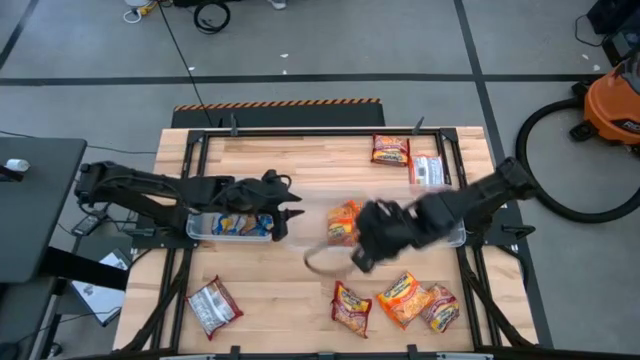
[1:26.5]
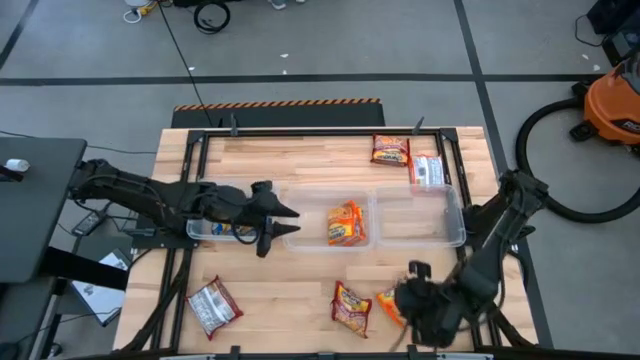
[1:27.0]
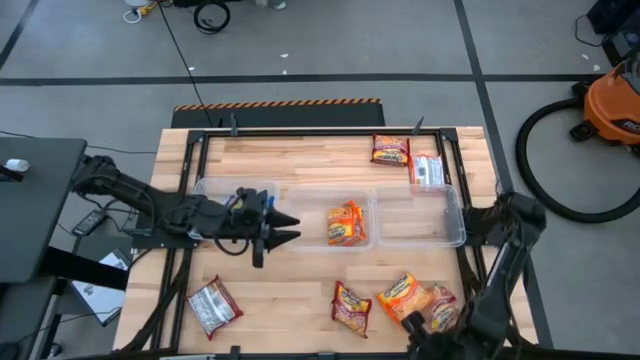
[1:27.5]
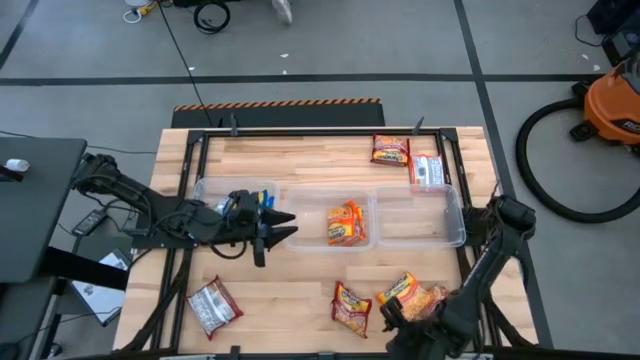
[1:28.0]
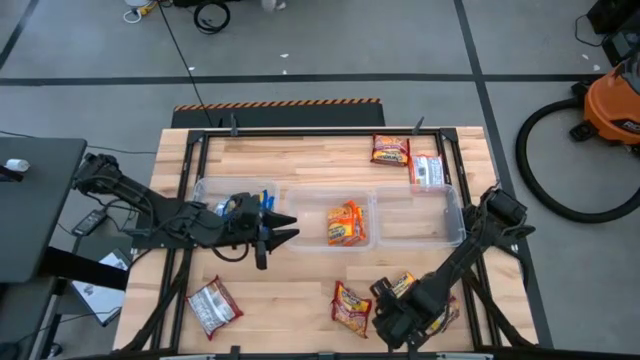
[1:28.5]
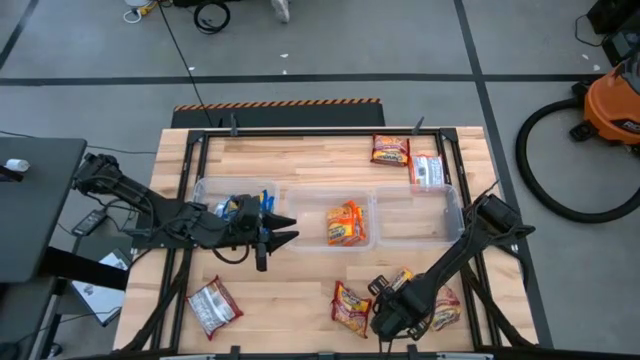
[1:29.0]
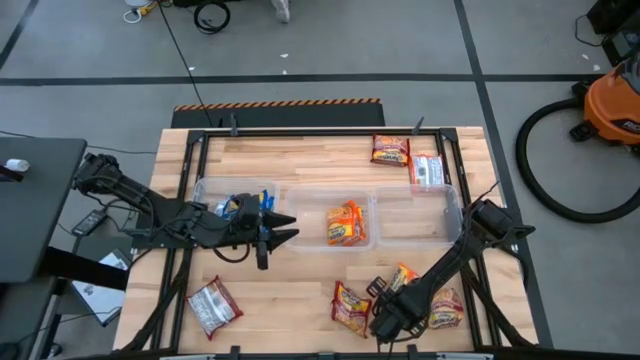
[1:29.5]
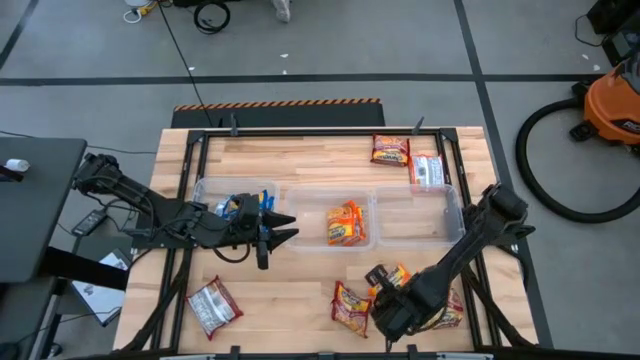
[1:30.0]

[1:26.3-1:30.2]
Task: Sort Maruchan noodles
Put the orange noodle pack into the middle transparent bin

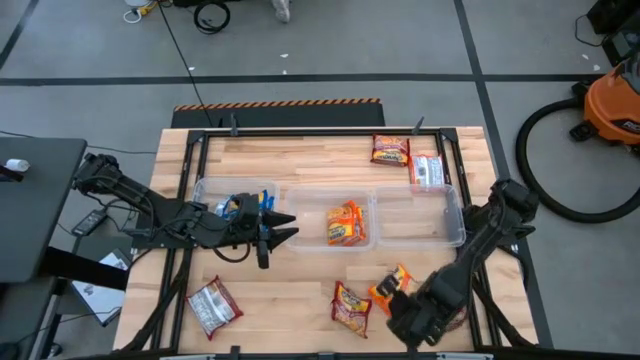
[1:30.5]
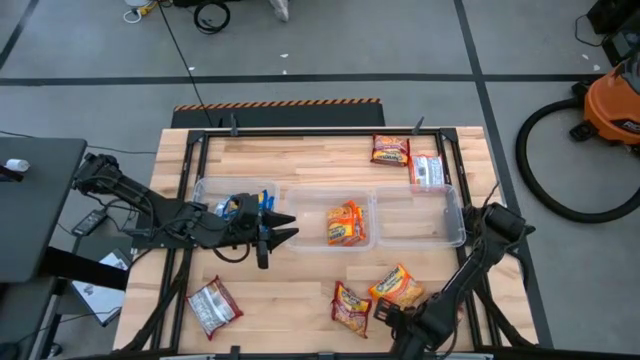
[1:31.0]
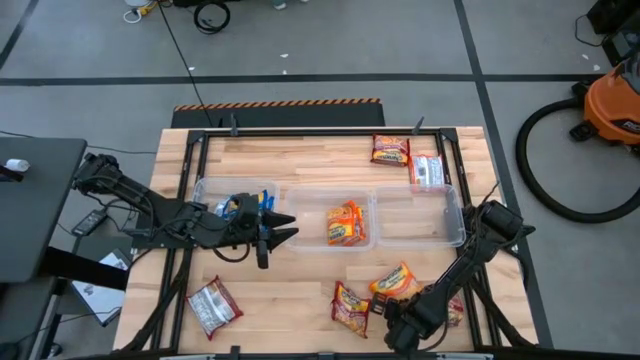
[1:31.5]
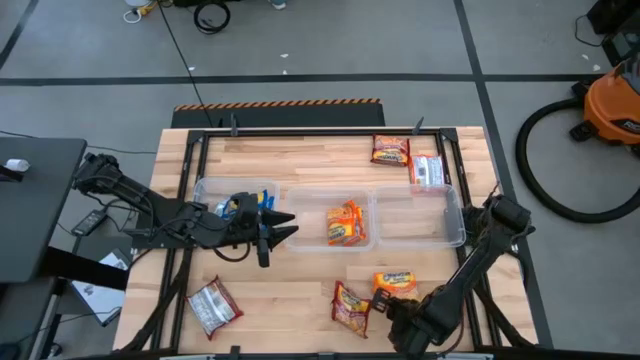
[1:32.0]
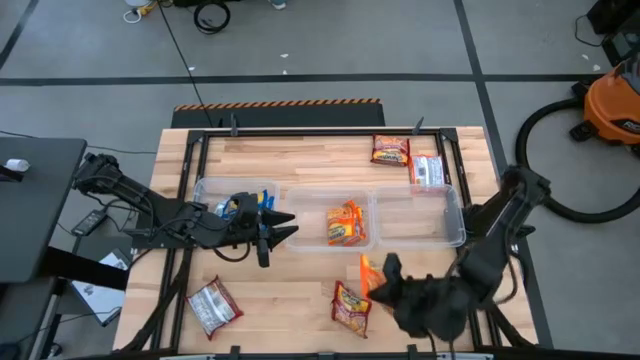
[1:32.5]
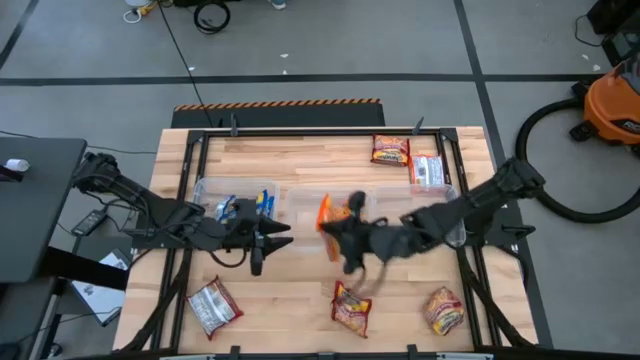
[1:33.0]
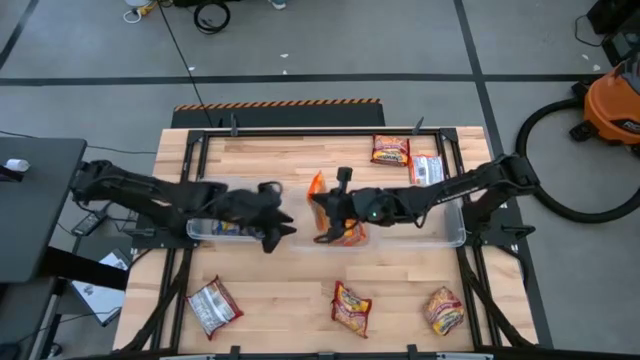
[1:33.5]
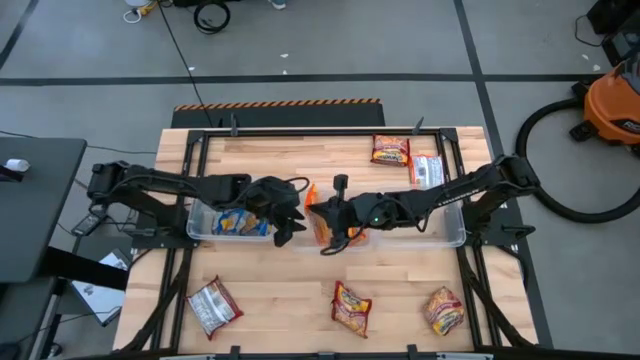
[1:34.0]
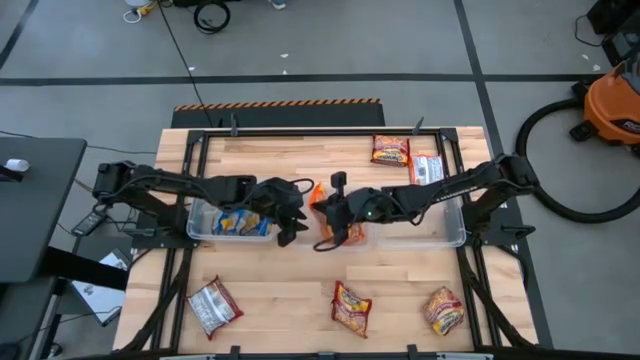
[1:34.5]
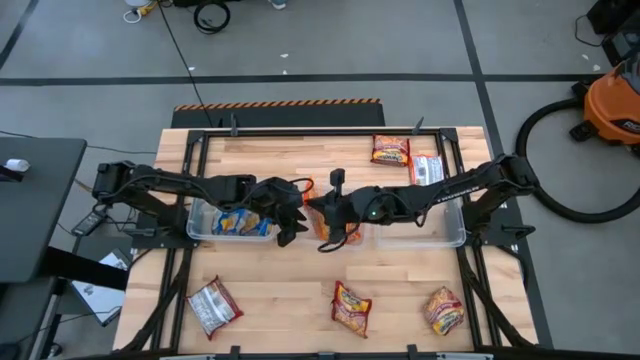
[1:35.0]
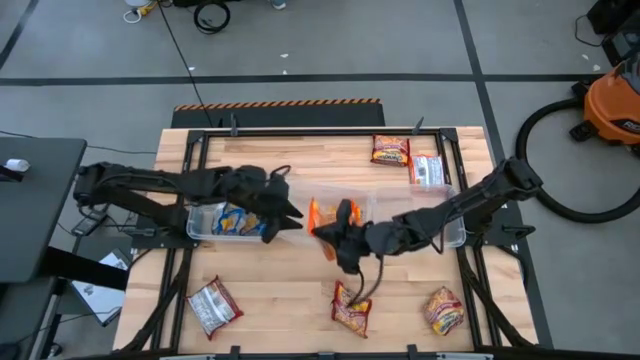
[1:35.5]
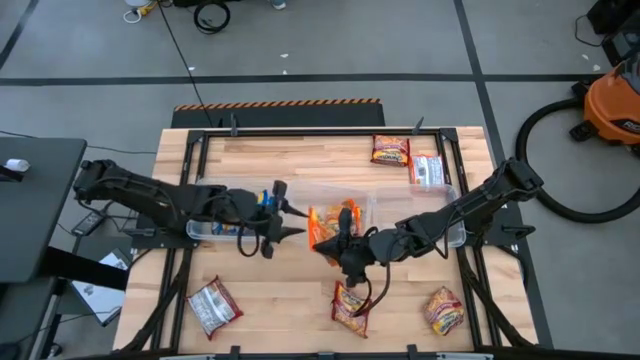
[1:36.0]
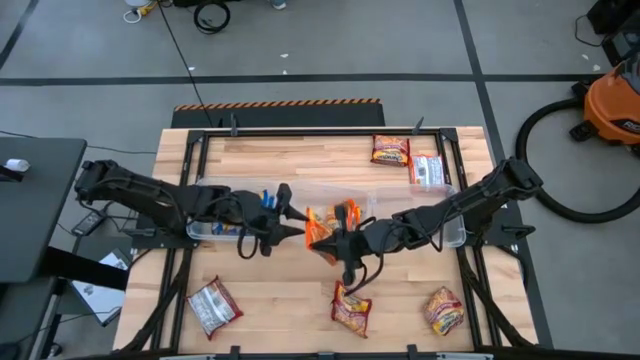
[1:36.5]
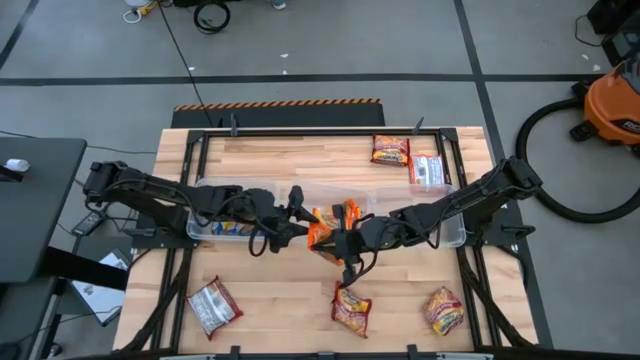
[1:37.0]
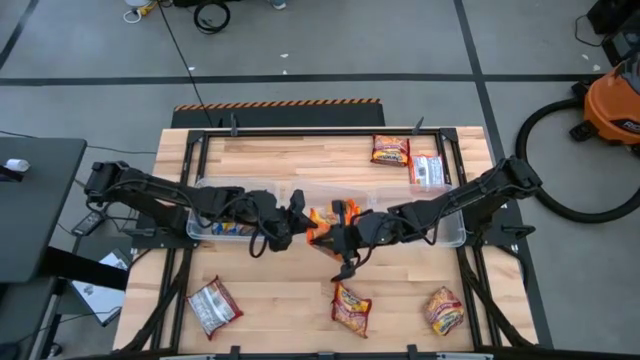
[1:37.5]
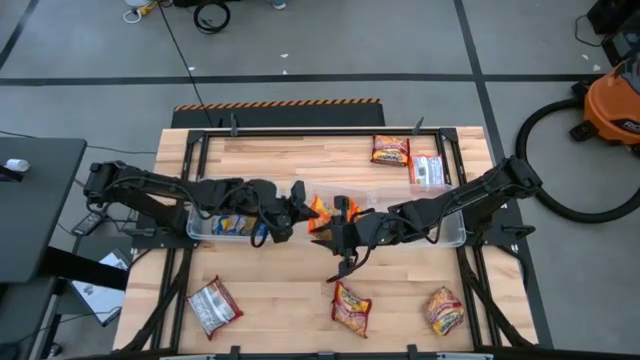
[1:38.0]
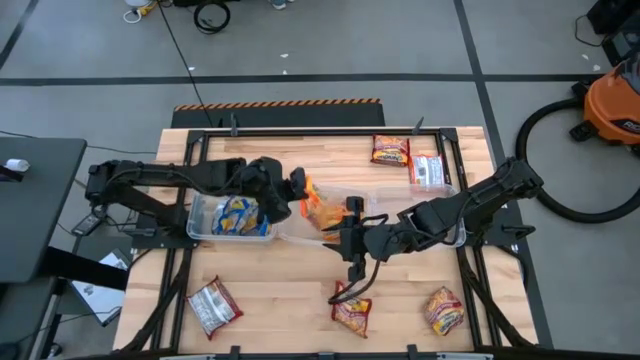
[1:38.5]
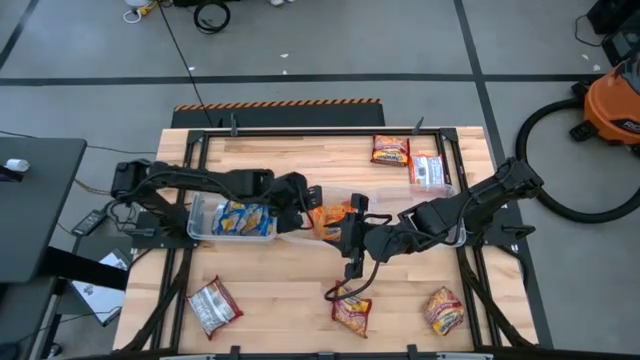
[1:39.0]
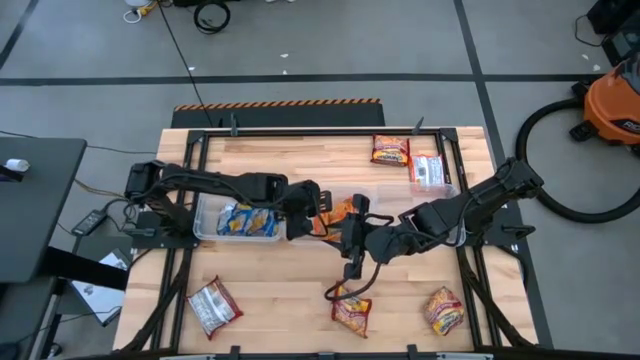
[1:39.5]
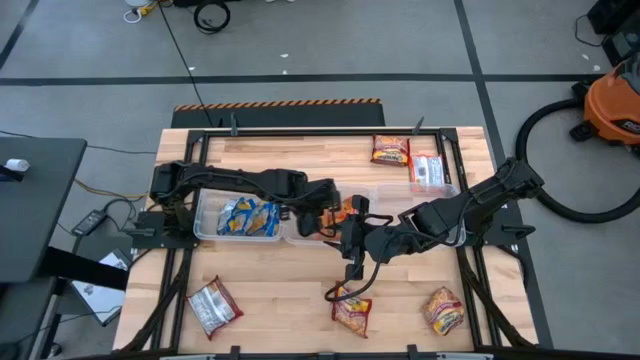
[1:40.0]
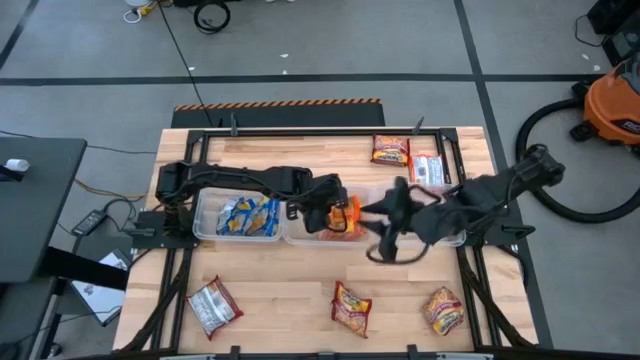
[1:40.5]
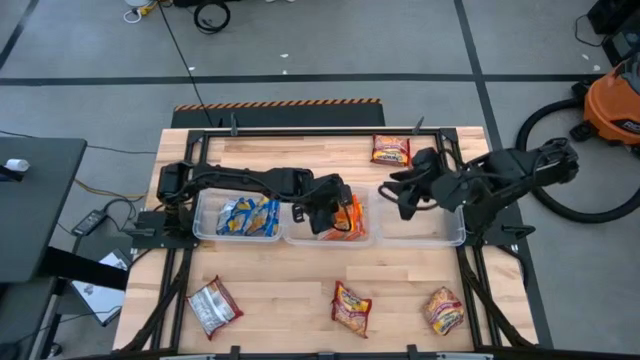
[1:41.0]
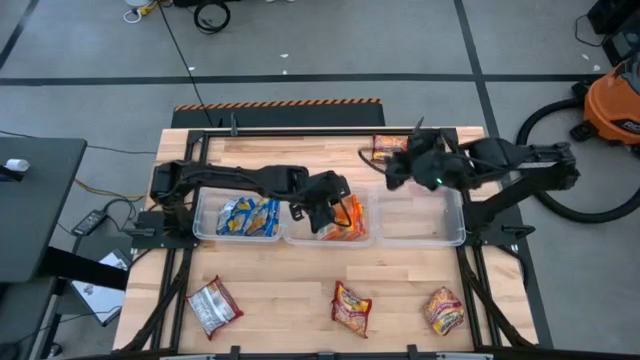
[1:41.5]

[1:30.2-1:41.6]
Put the orange noodle pack into the middle transparent bin

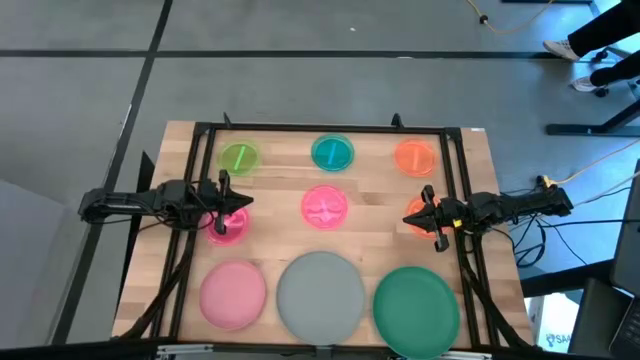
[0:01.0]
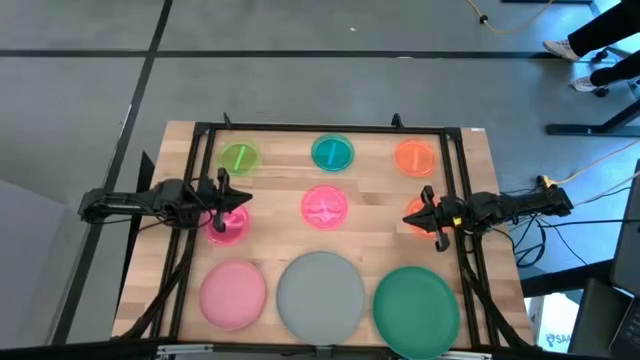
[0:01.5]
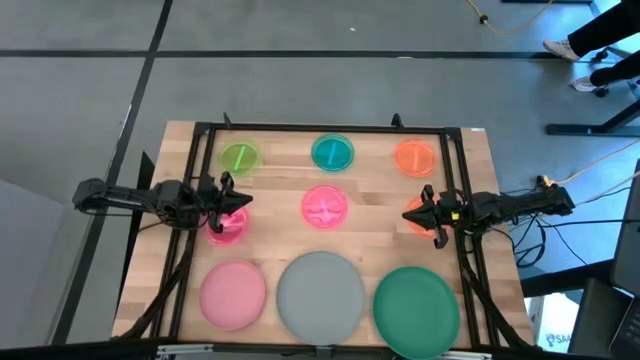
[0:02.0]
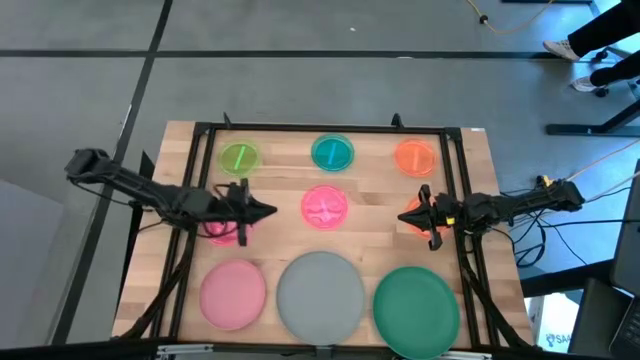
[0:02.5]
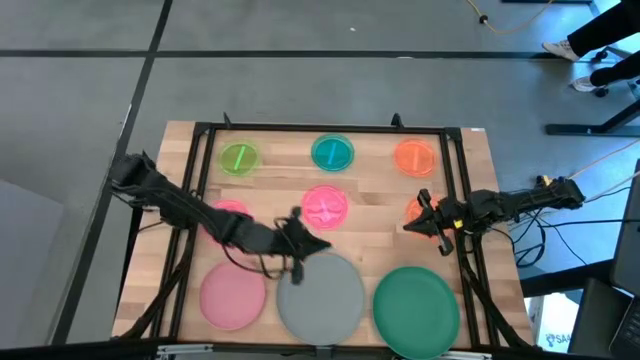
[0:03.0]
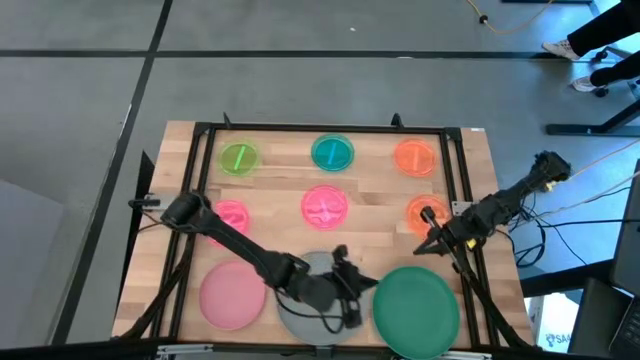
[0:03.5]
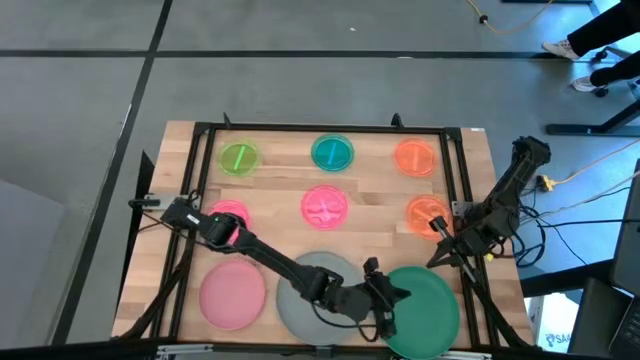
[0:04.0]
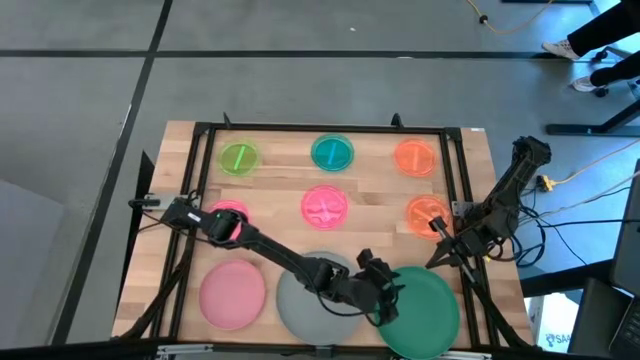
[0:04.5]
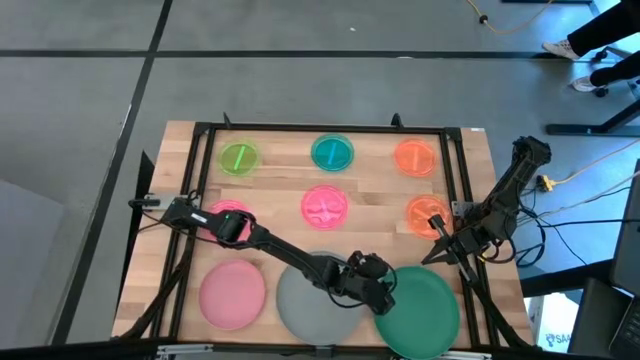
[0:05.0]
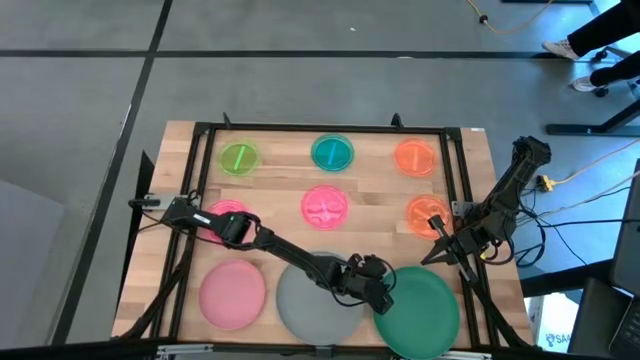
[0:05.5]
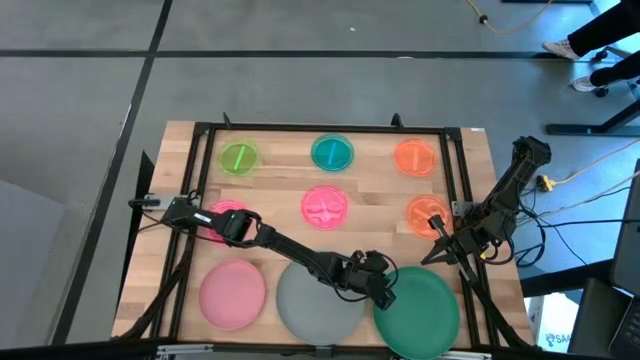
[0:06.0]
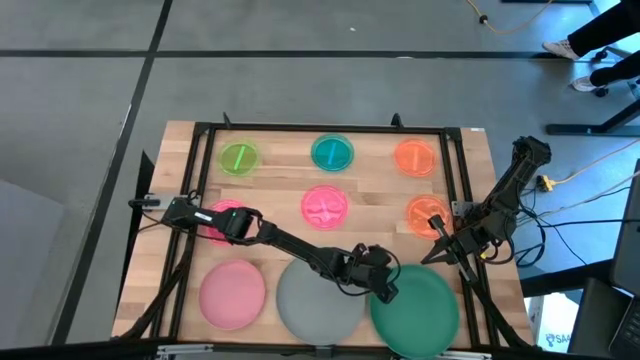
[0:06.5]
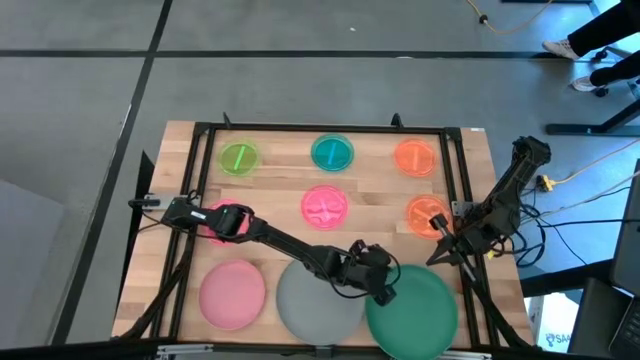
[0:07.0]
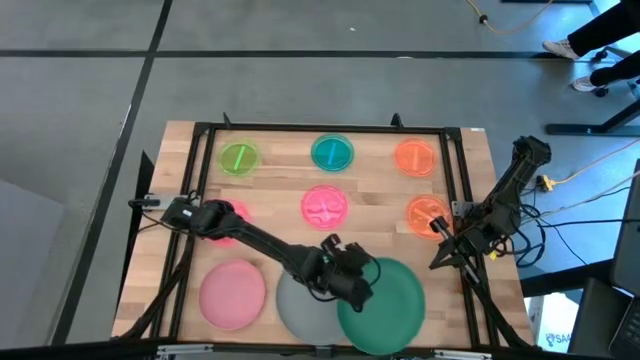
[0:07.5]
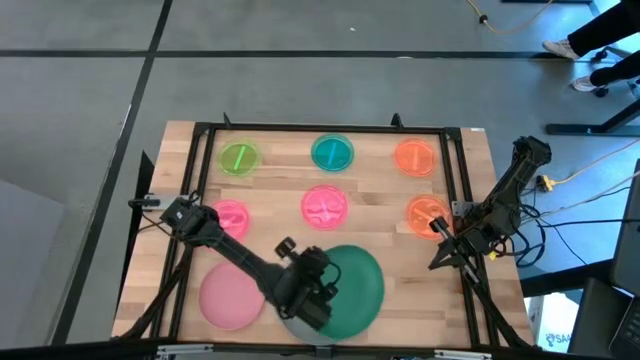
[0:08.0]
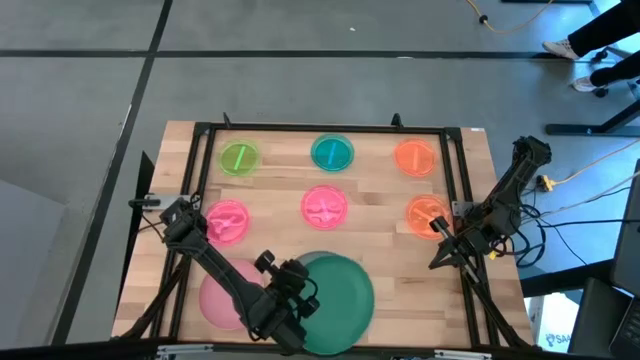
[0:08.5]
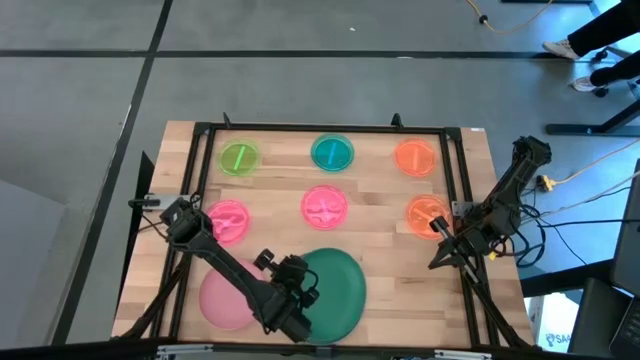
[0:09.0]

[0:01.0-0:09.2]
Task: Stack plastic plates
Stack the green plate on top of the gray plate
